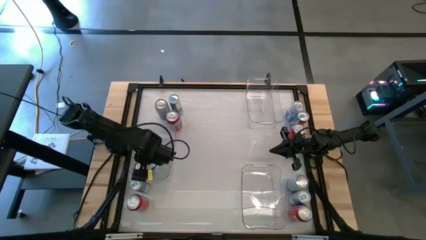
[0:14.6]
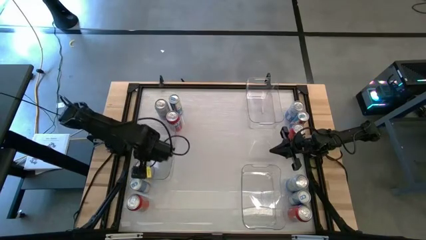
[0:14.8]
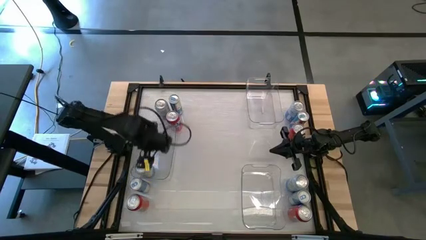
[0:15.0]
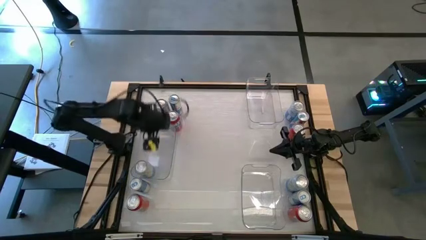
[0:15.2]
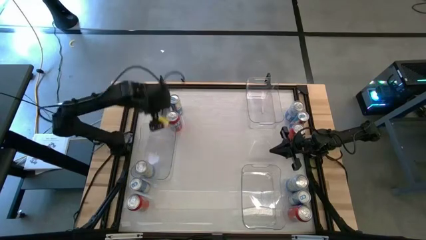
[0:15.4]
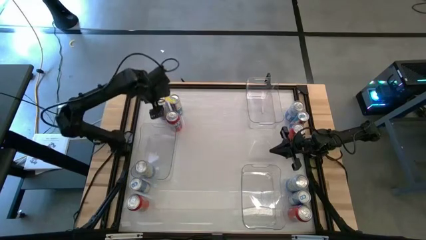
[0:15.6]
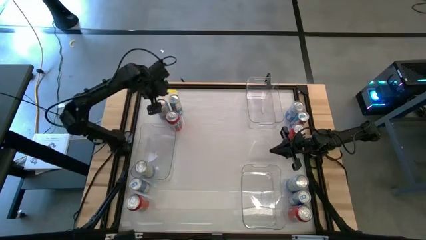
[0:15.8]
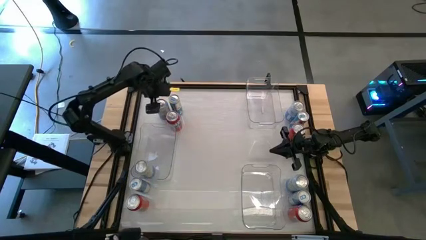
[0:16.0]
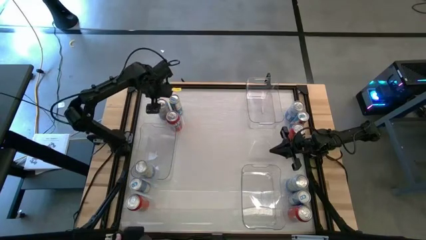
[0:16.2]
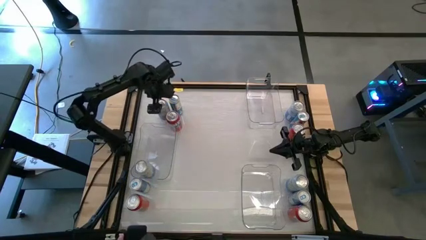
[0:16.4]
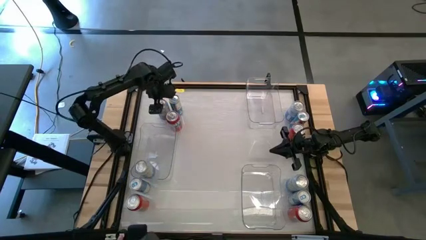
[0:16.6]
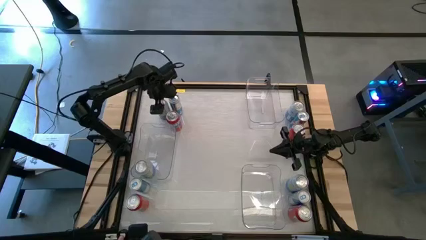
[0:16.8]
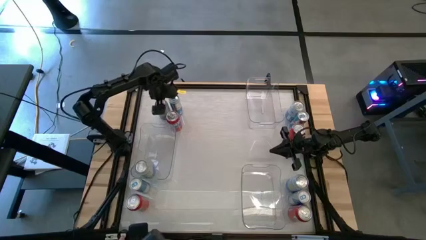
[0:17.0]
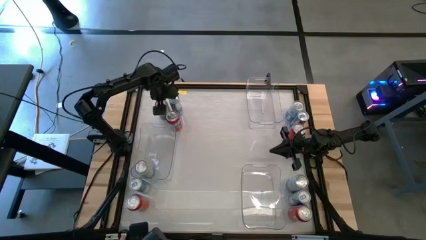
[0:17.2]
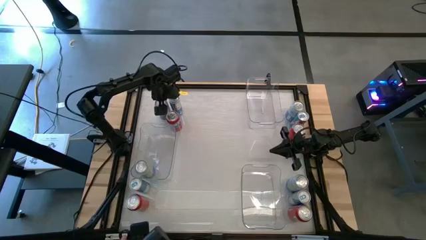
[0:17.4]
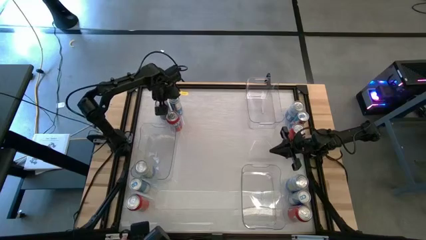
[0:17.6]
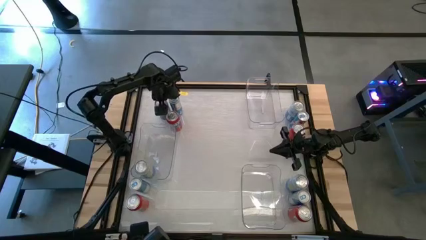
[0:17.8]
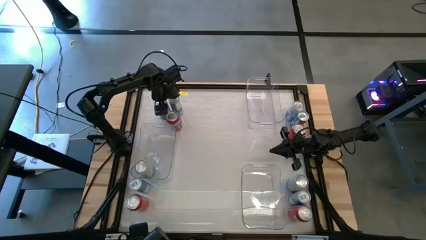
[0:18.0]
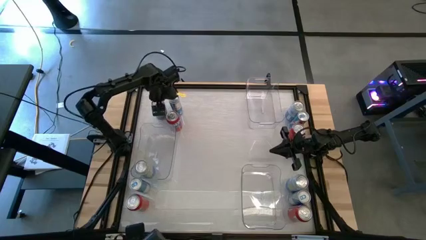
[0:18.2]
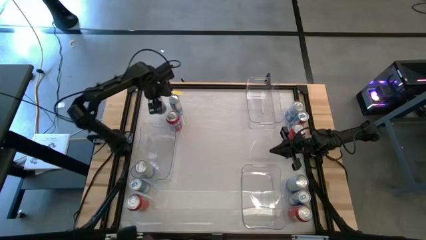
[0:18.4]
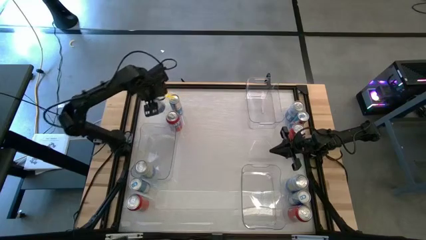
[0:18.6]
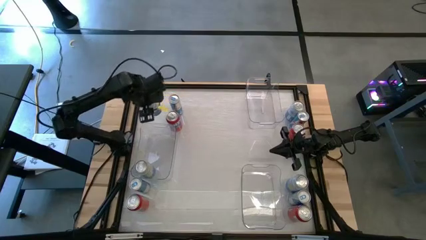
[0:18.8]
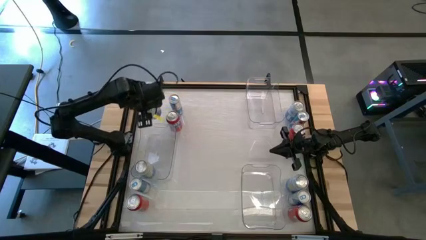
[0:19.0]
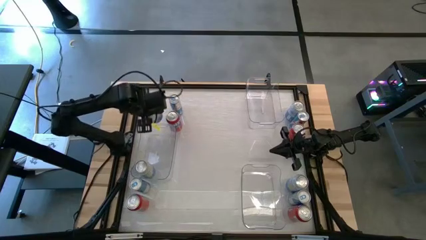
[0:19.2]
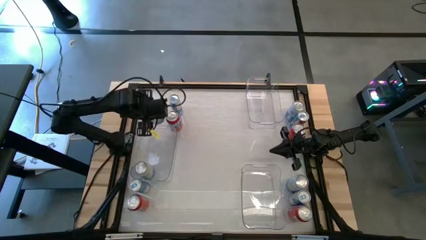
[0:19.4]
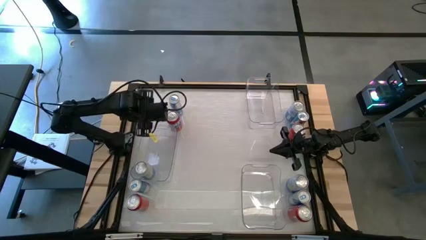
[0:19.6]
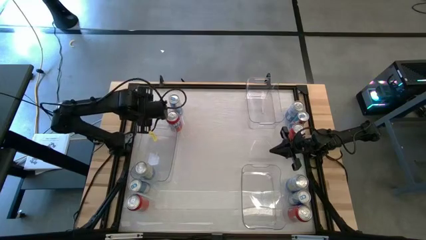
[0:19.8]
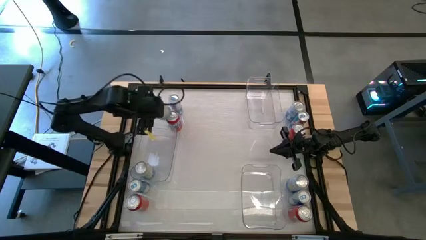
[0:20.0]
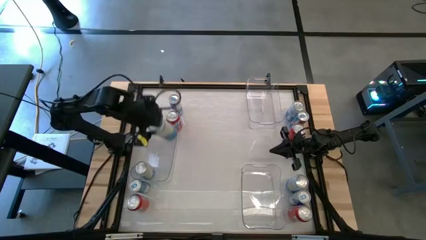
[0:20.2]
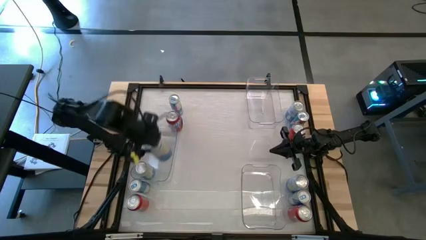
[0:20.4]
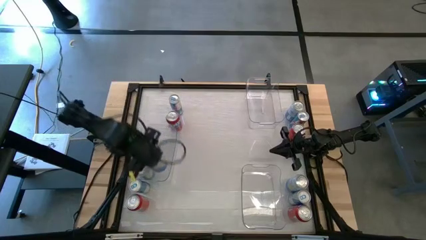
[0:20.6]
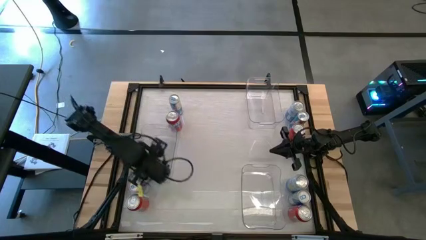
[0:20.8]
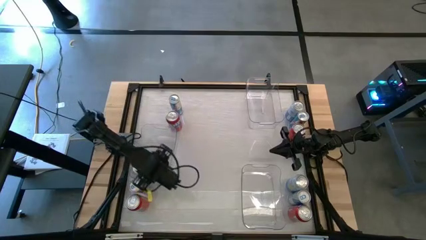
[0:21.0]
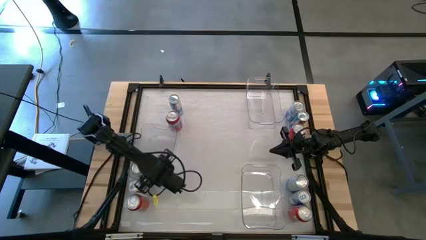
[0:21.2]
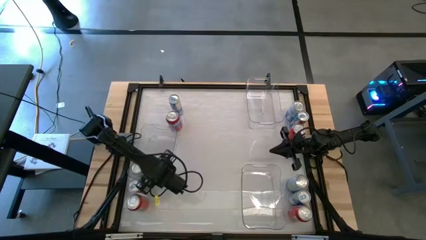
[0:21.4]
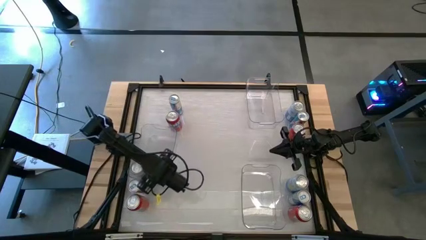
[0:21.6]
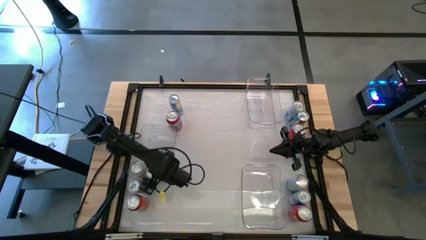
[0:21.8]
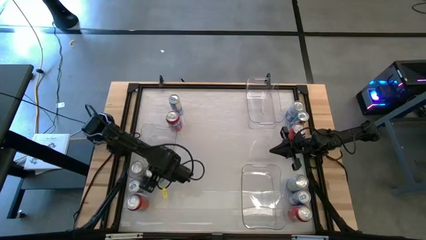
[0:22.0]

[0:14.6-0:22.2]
Task: Sort soda cans
Put the top left blue and white soda can into the middle left transparent bin

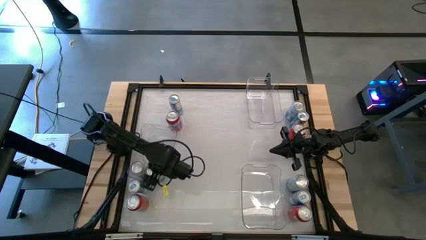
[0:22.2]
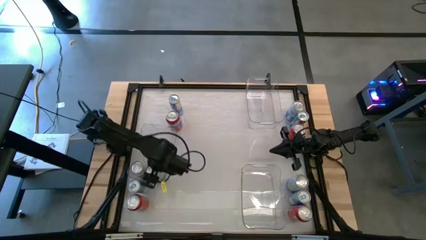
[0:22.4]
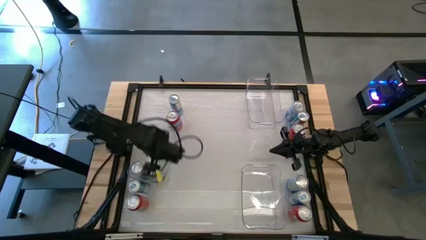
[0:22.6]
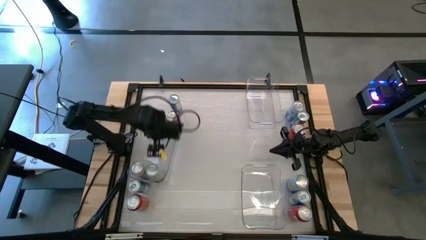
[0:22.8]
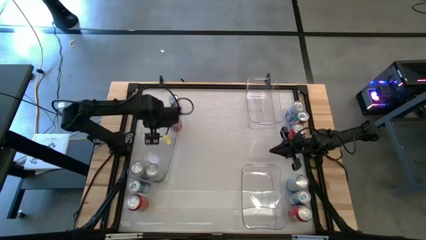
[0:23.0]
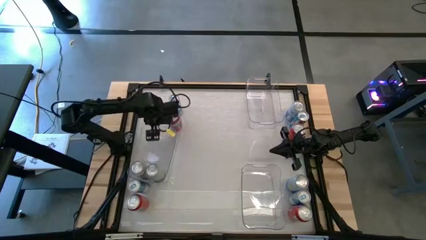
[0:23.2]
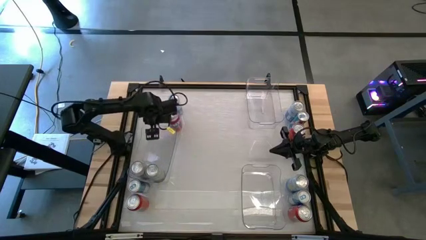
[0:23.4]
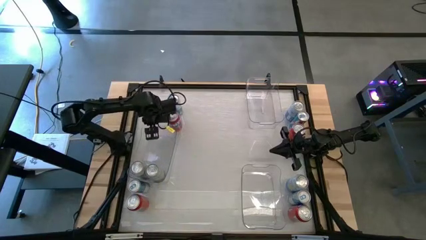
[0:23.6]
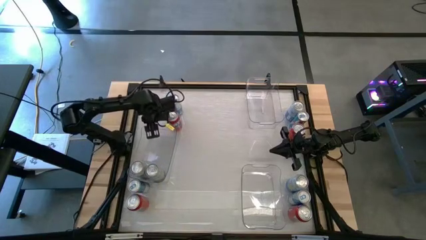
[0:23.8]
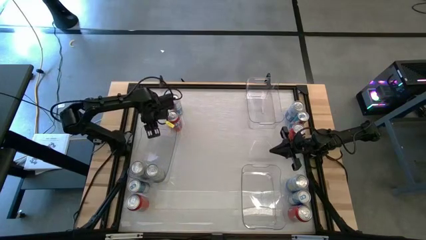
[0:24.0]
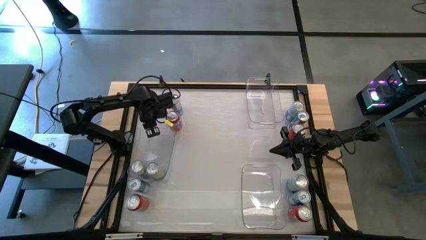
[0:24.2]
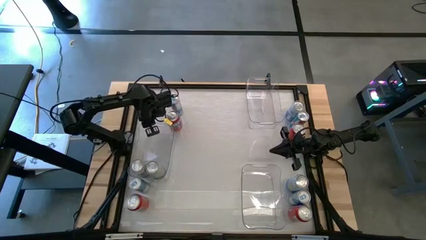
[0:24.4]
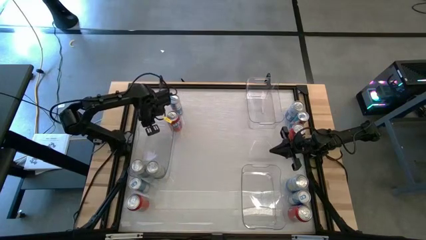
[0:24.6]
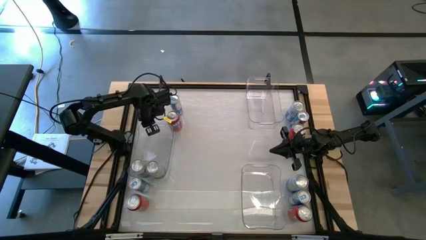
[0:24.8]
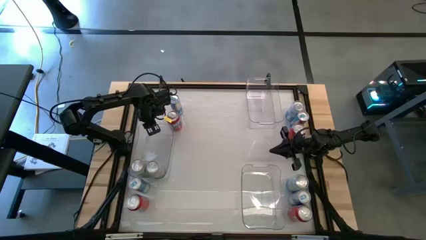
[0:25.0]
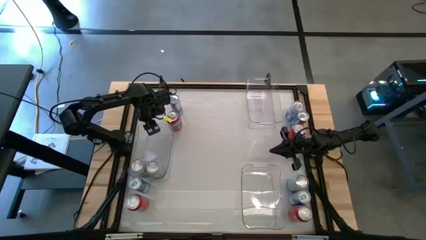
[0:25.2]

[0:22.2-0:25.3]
Adjust the middle left transparent bin on the table

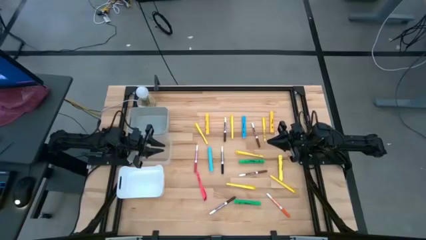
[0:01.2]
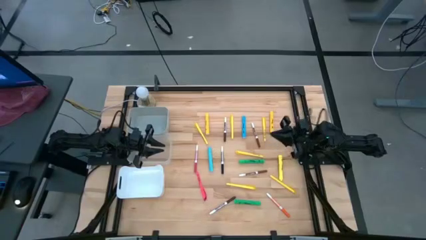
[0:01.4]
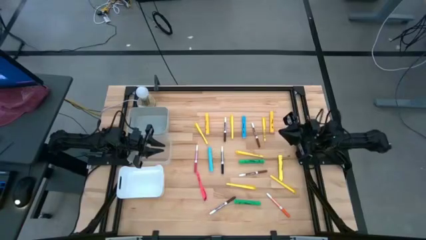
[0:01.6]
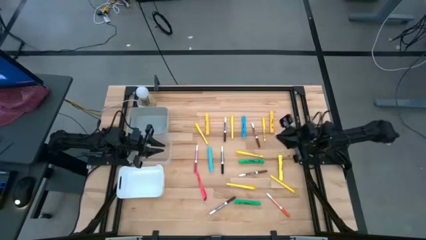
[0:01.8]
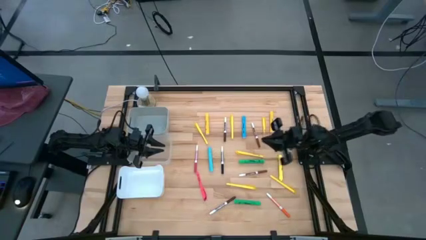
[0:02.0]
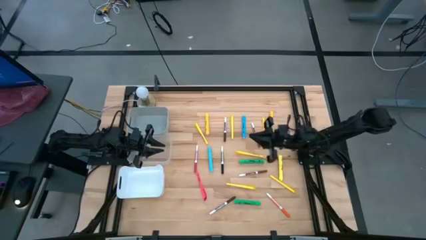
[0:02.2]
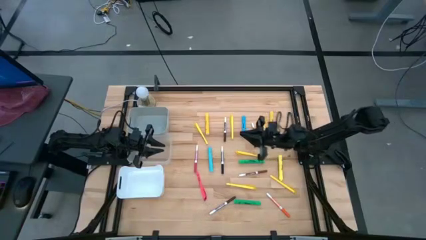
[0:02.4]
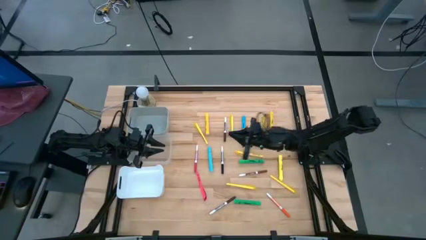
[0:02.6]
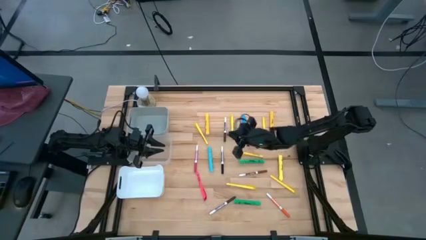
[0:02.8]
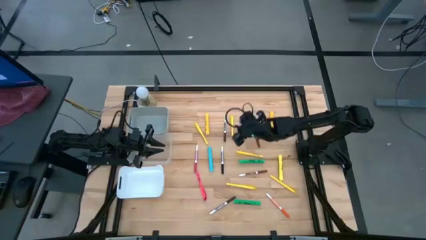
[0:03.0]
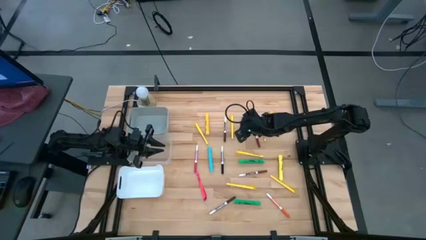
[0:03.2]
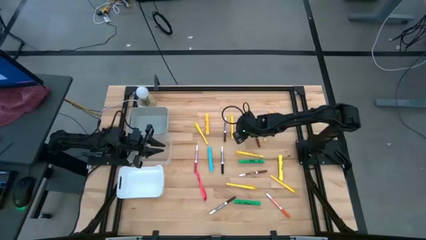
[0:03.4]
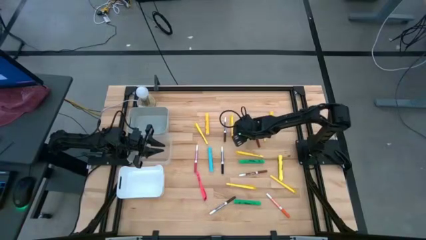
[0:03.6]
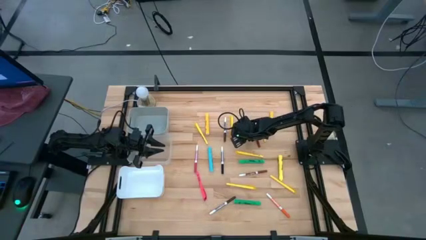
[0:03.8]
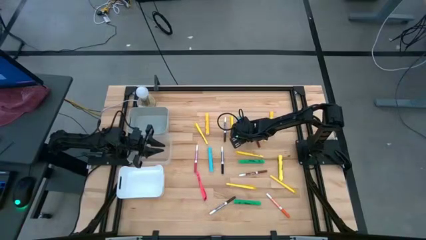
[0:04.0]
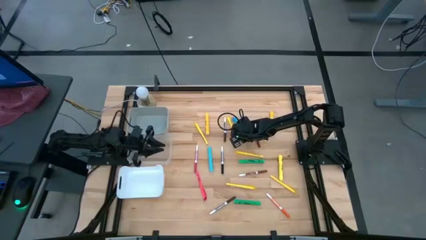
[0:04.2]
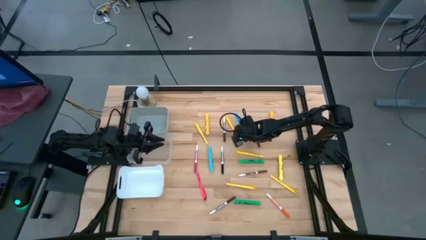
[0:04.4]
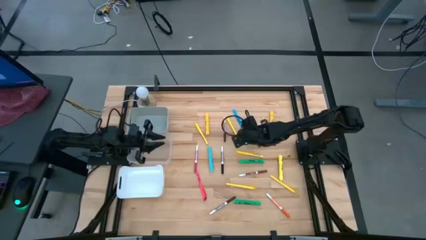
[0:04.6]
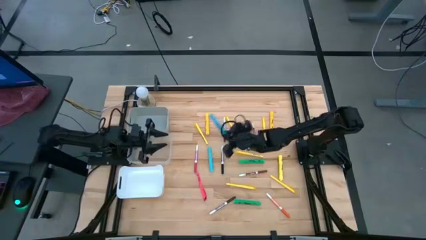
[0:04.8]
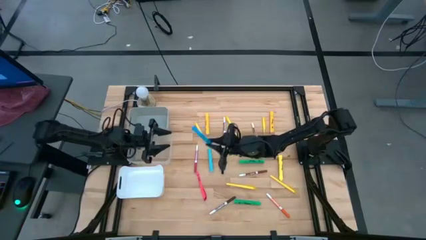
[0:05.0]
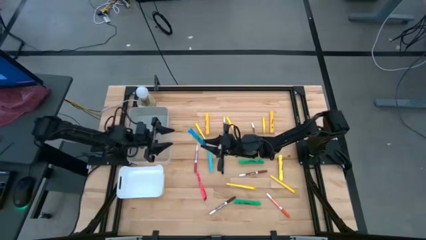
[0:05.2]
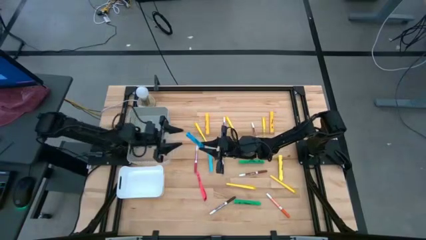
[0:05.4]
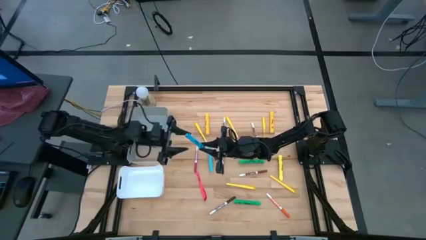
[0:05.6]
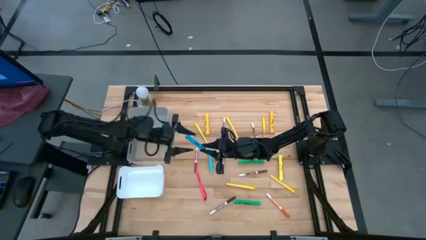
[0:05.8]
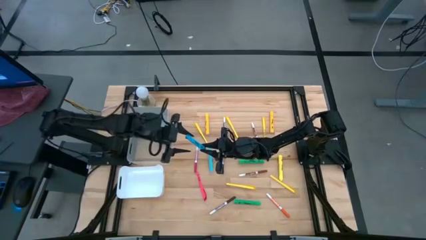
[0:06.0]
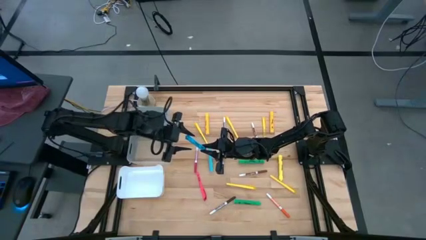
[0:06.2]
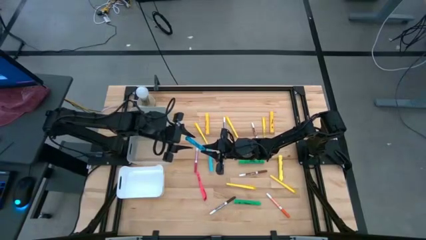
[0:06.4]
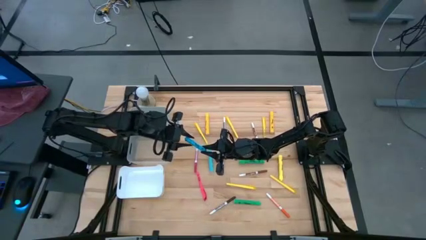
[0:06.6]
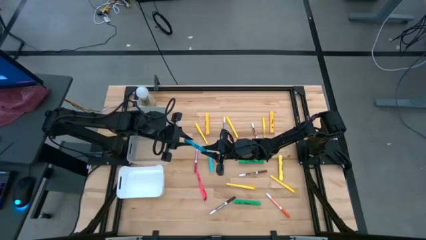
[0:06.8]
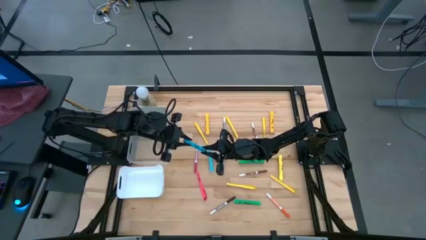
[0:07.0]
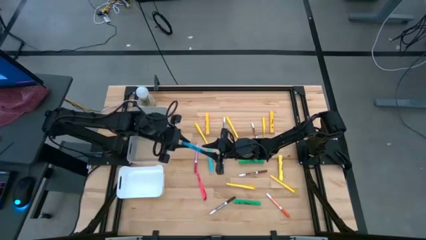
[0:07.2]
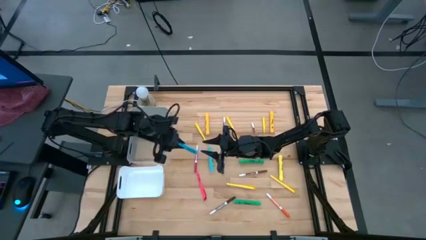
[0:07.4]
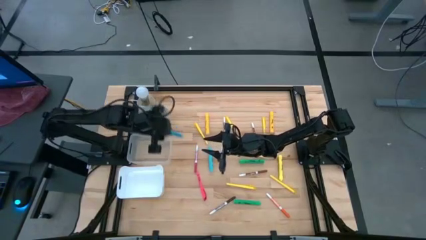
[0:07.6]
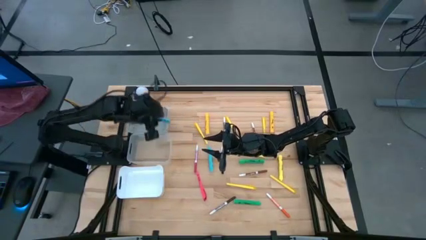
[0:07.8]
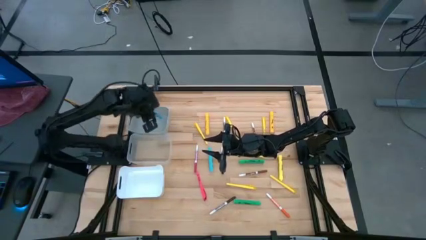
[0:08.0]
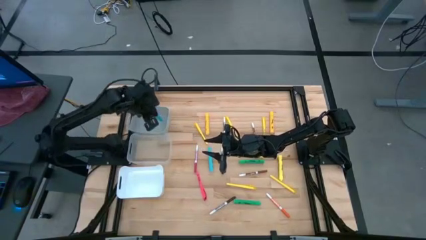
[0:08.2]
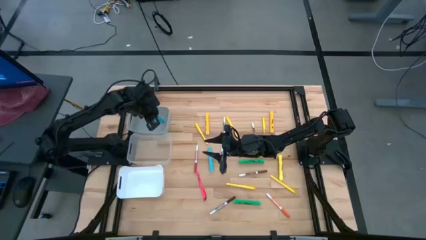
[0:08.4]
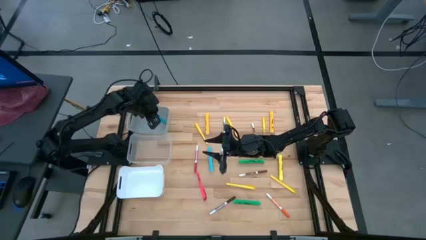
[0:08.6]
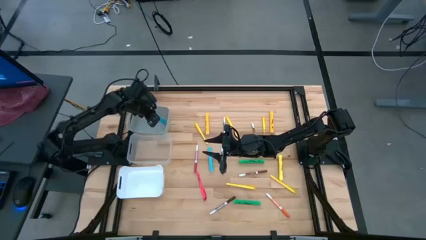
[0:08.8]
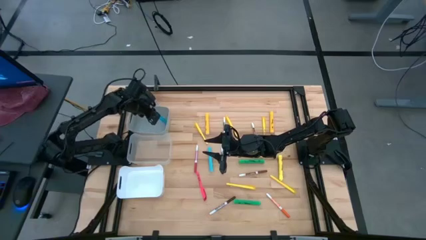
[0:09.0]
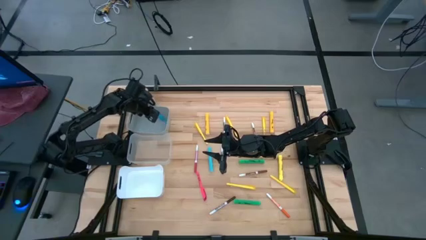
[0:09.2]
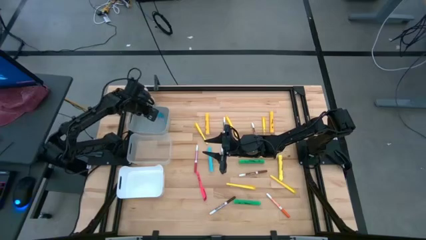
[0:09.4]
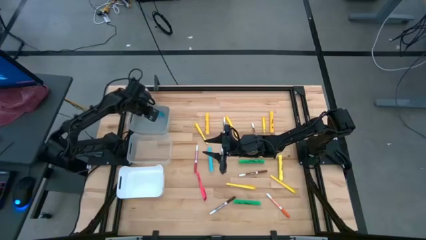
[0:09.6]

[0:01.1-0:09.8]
Task: Pick & Place Markers
Put the blue highlighter into the gray bin
